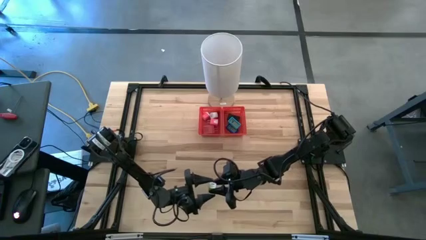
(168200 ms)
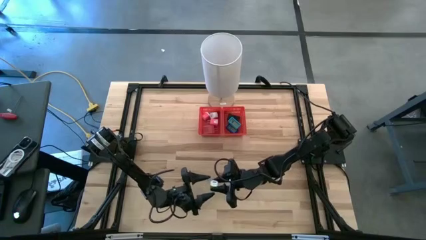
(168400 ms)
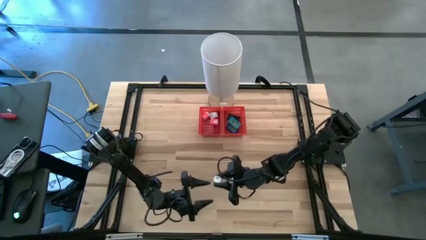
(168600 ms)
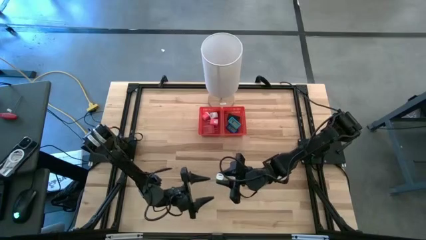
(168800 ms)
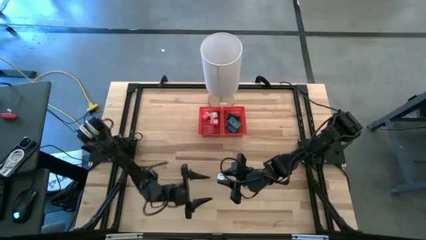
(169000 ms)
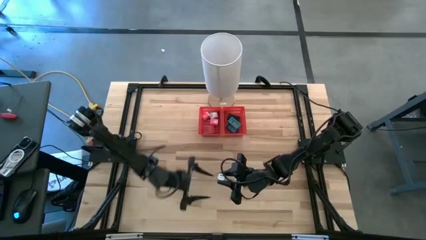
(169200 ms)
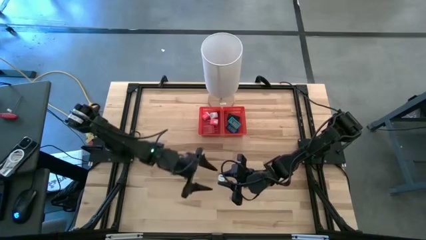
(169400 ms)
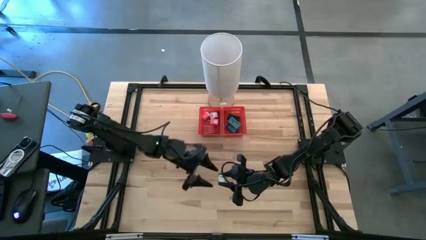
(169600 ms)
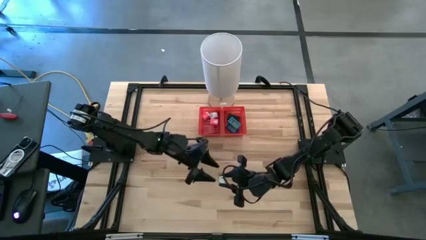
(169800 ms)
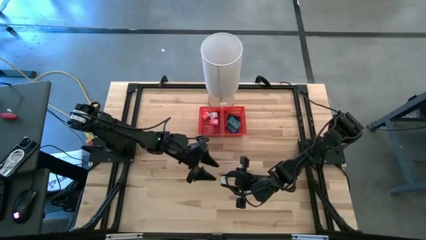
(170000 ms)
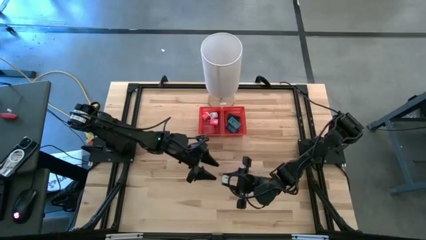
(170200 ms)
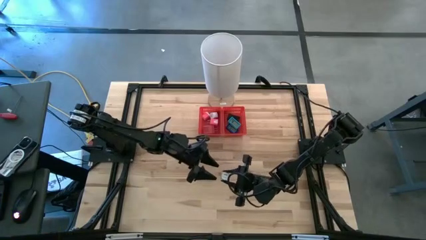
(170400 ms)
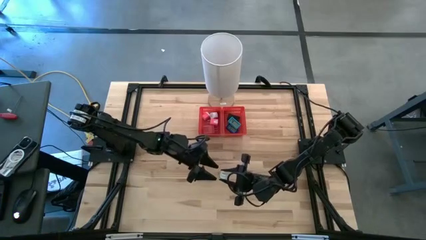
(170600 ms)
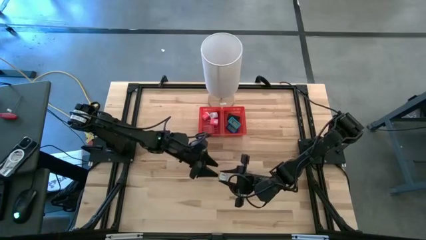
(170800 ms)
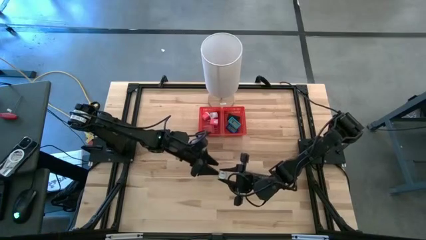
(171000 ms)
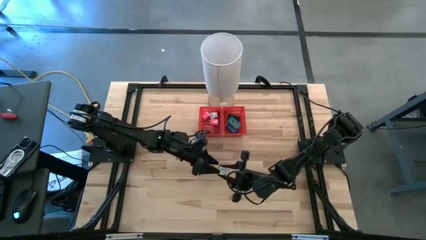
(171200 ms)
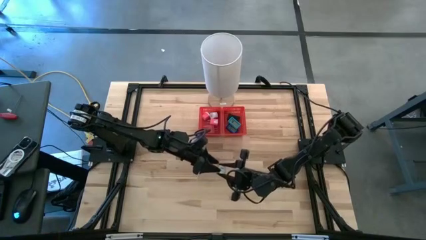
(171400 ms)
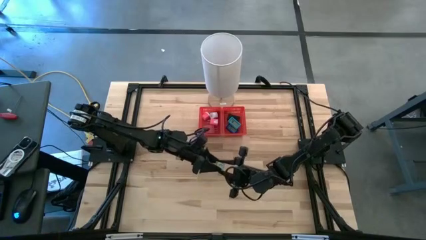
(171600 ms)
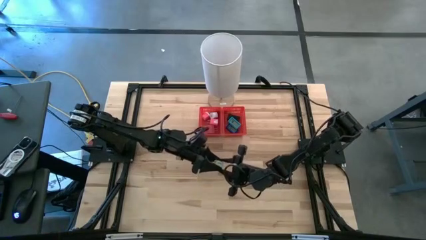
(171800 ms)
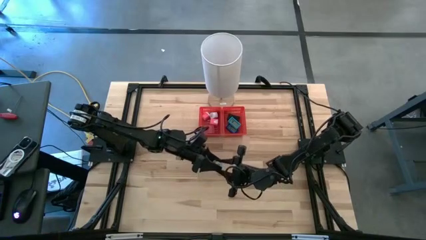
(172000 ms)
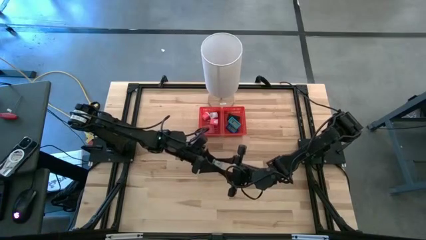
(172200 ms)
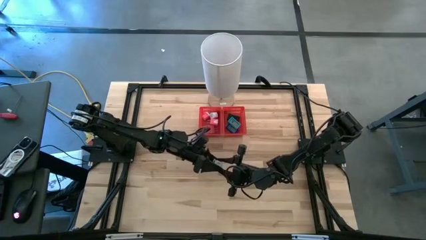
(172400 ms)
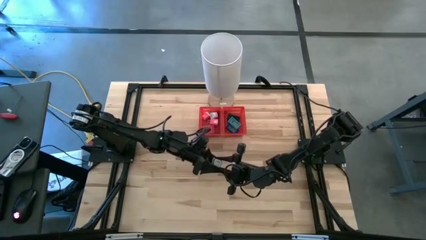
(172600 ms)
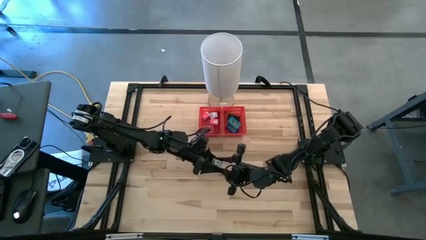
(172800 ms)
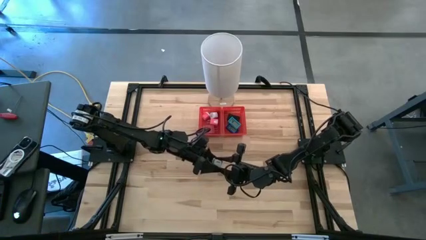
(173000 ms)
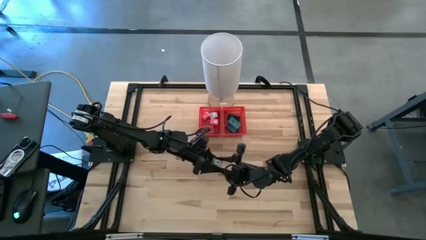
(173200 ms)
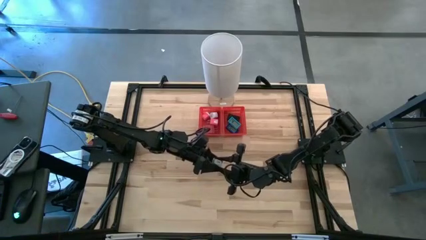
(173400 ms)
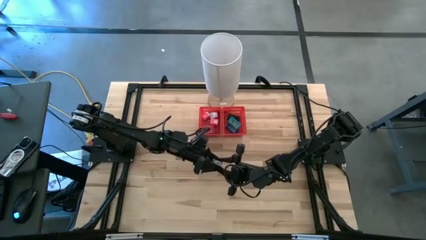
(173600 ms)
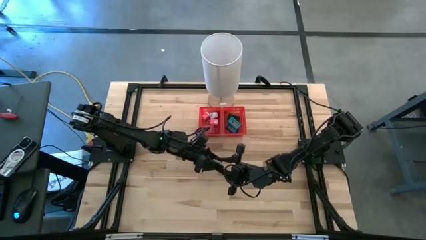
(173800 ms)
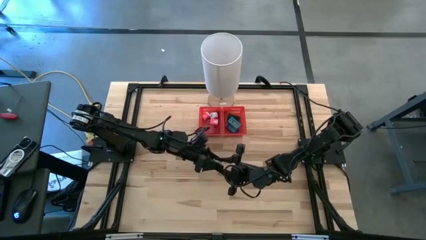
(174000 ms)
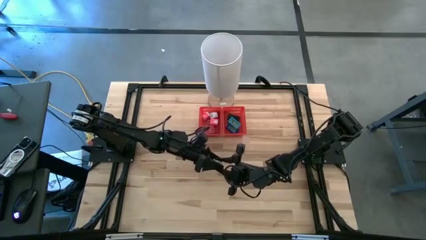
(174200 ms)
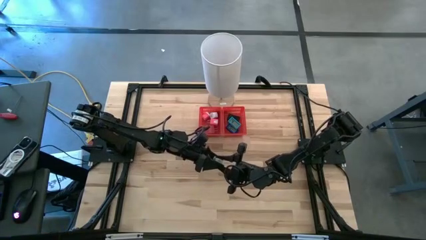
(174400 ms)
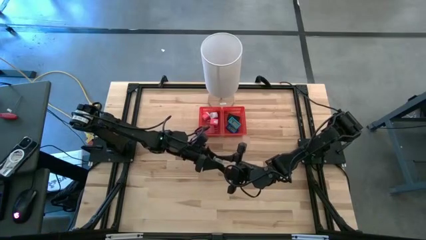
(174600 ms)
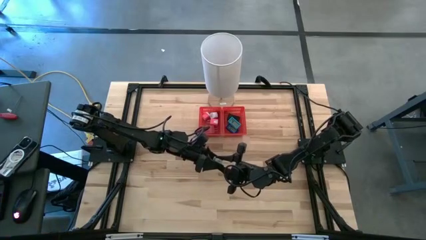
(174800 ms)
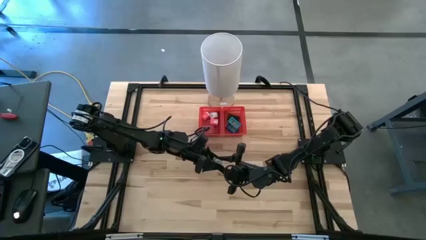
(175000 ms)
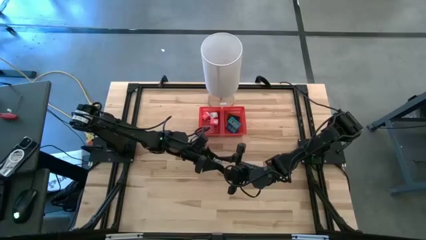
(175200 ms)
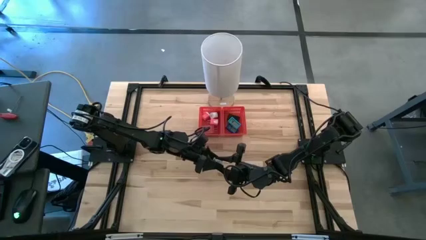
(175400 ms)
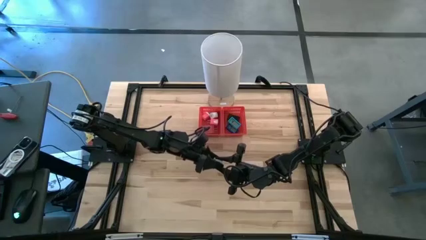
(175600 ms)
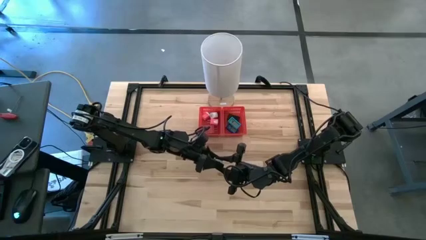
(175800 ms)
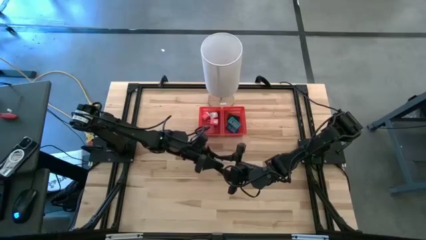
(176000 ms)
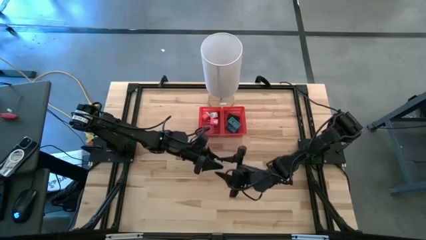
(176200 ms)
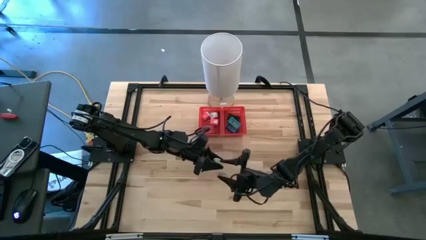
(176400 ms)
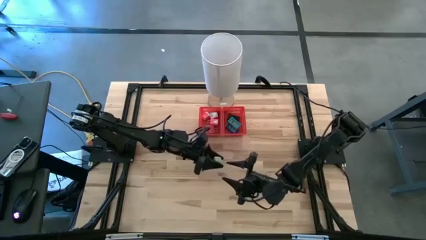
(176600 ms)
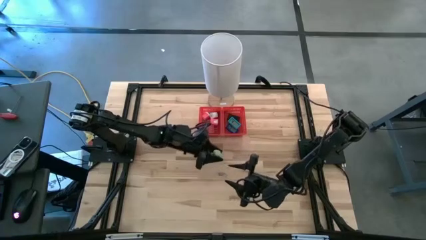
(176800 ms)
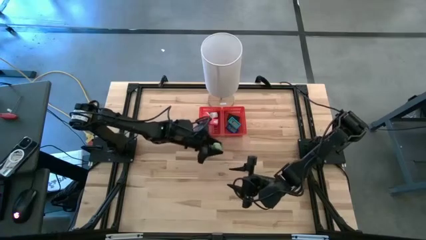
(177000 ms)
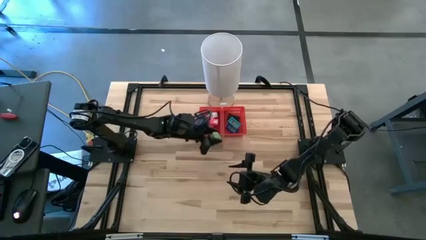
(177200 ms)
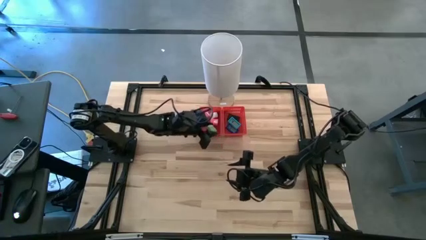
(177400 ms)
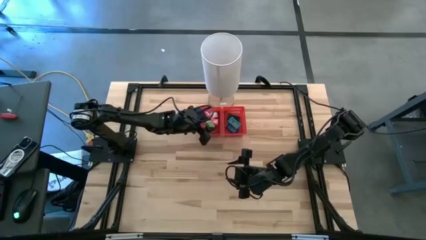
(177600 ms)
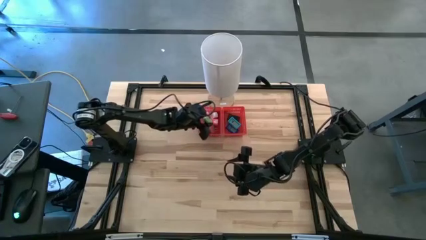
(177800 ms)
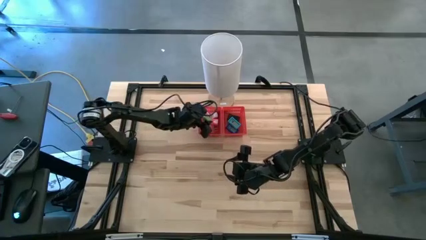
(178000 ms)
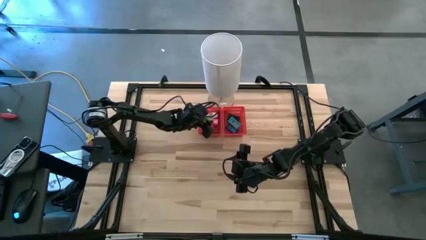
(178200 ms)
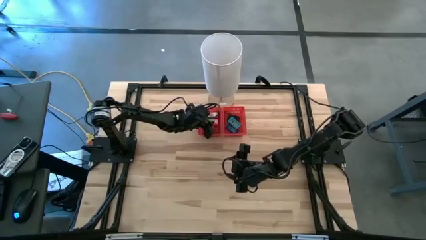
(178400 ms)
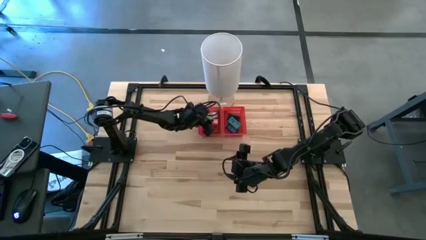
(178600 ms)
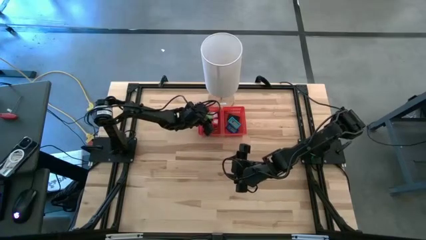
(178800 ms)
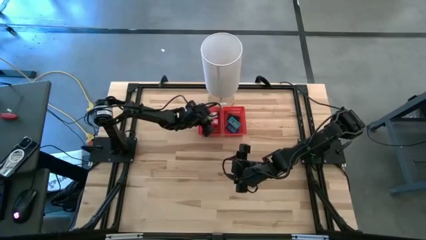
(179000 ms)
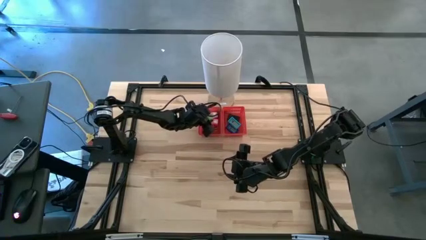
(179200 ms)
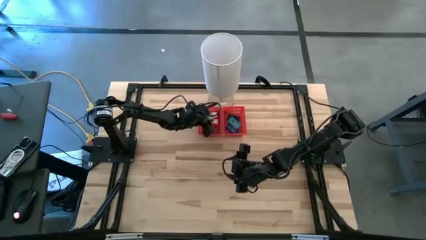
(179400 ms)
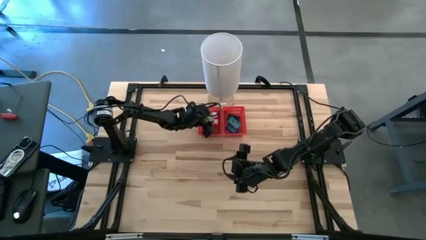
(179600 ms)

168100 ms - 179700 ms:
Task: Pick & Place Office items
Put the green charger adapter into the left red bin

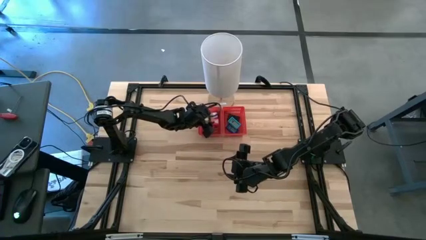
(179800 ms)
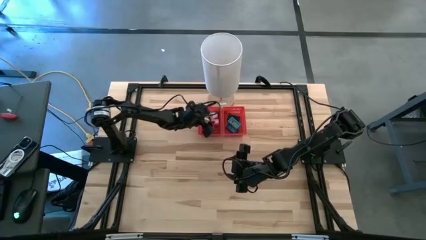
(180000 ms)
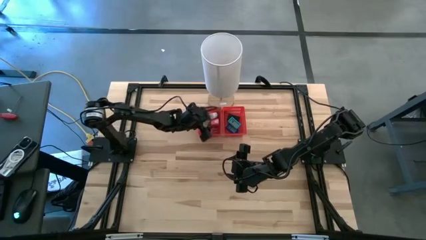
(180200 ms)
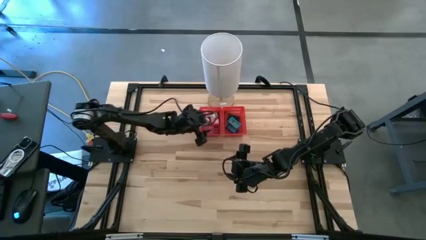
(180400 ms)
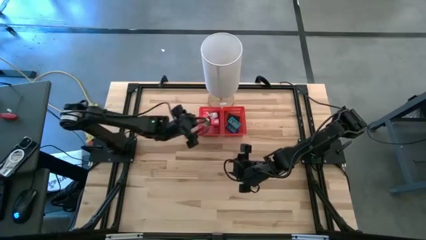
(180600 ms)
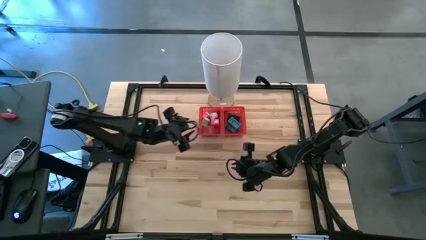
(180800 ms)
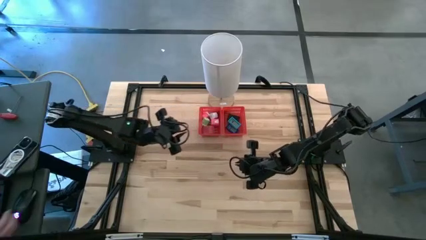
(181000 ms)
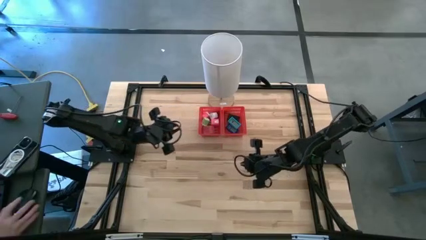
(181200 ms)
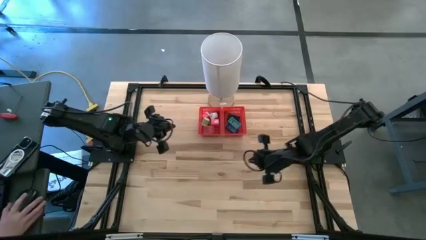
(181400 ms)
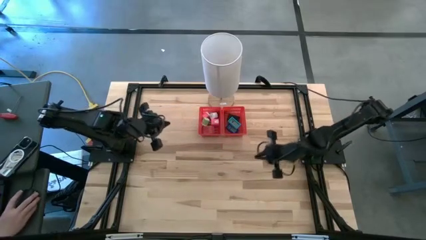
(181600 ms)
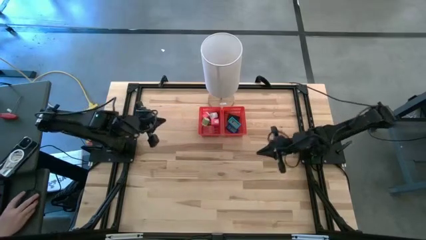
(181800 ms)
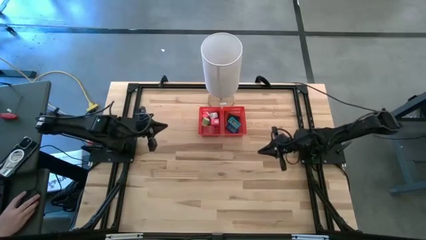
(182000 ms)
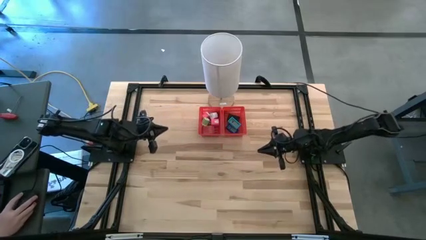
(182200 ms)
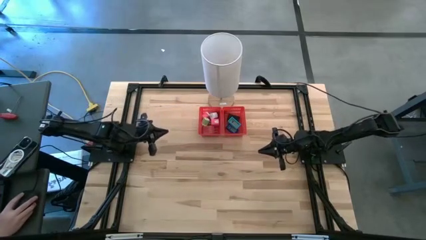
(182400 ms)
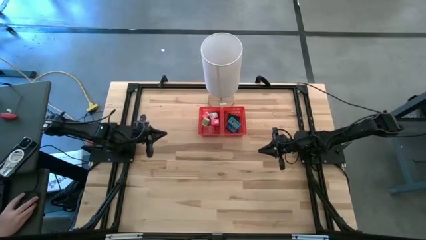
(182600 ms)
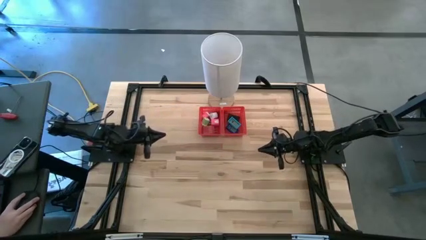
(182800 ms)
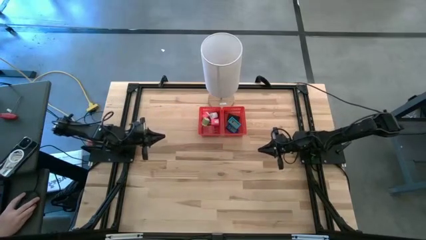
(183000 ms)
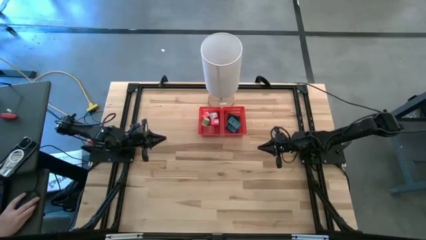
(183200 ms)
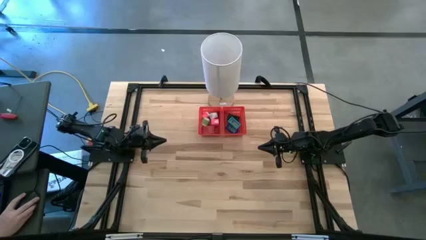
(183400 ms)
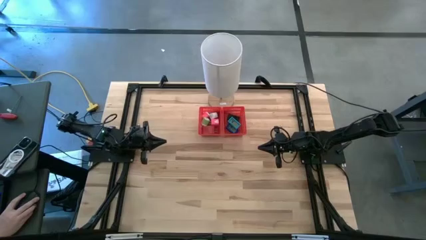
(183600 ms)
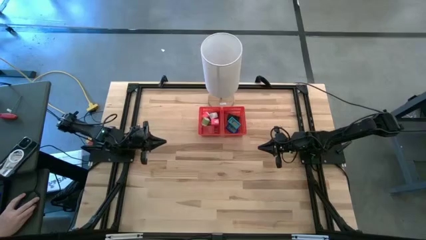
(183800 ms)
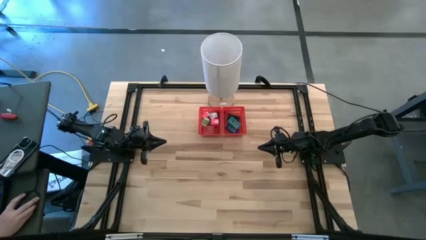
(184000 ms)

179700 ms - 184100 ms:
Return to Home Position
